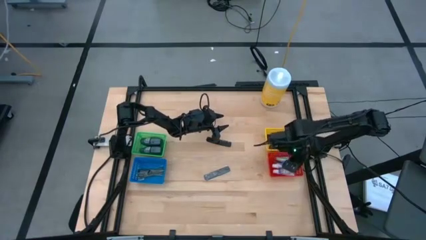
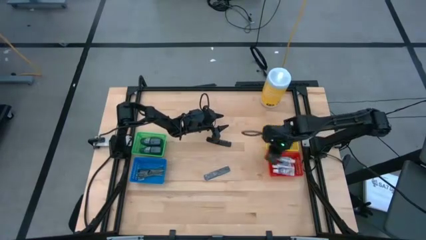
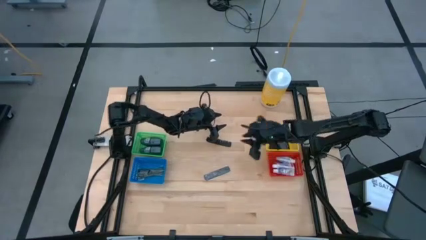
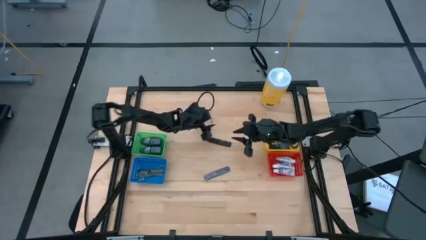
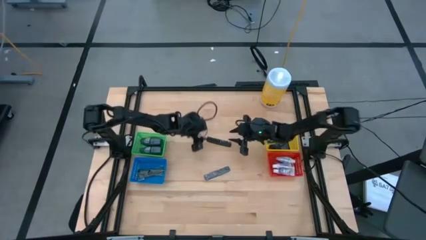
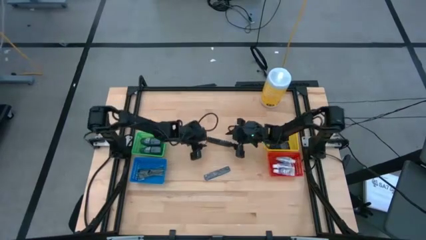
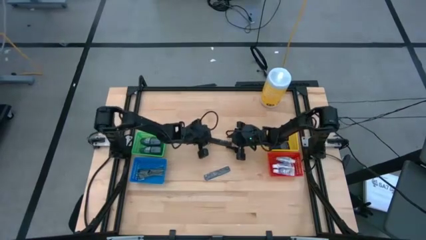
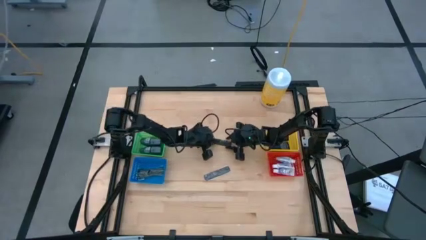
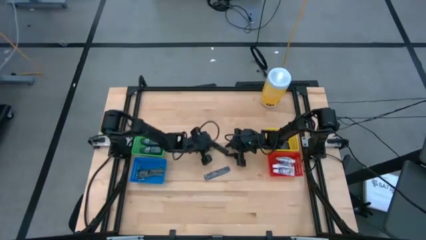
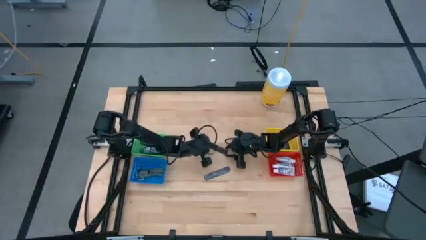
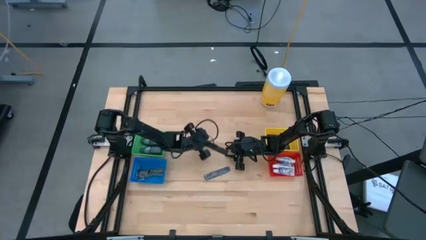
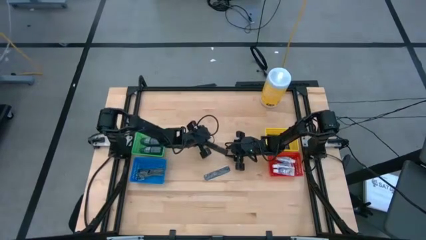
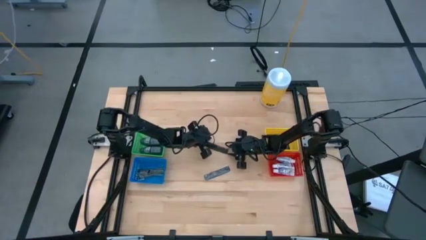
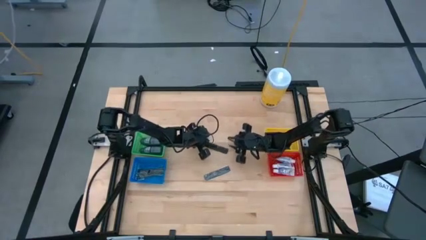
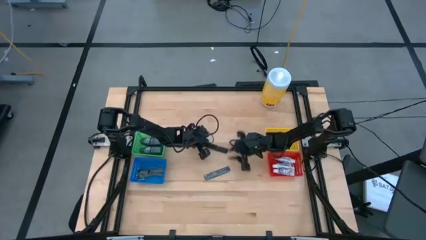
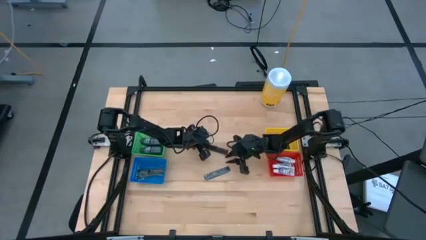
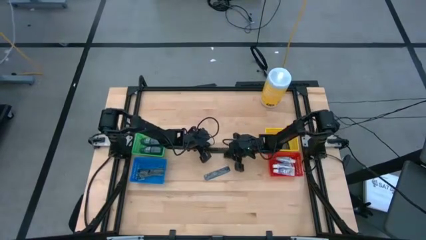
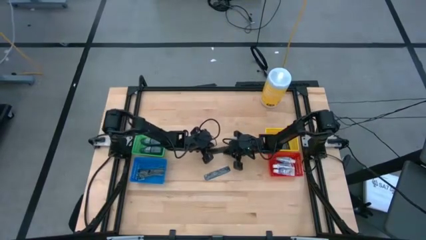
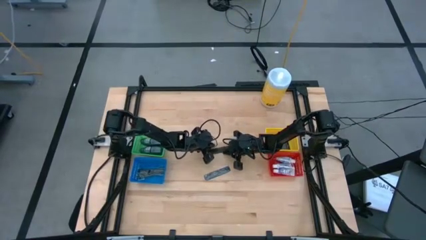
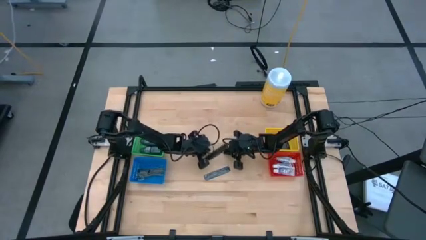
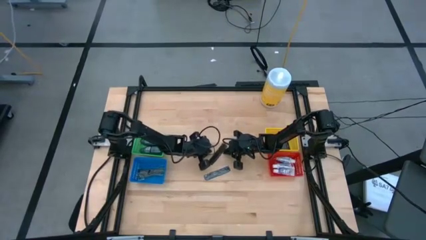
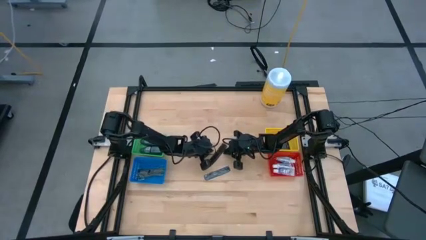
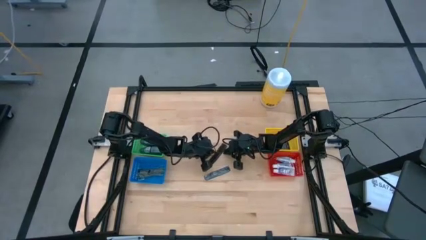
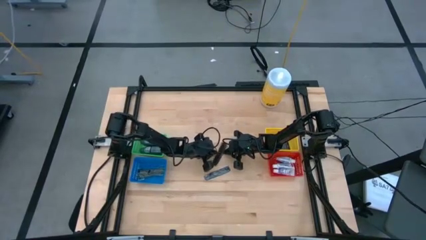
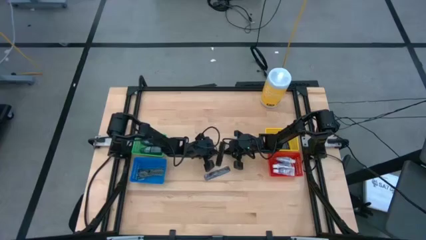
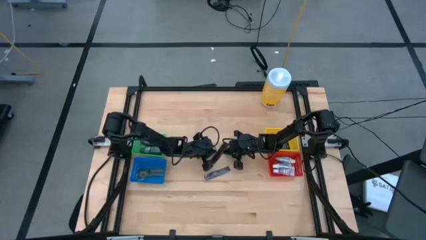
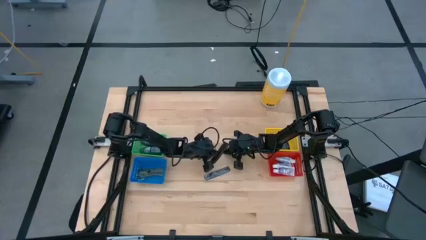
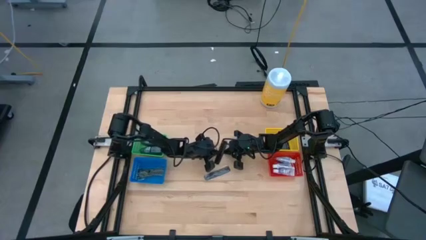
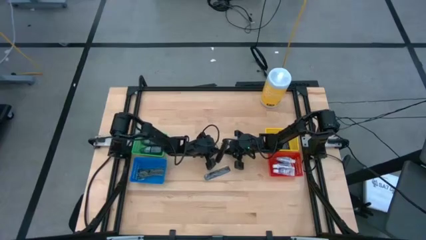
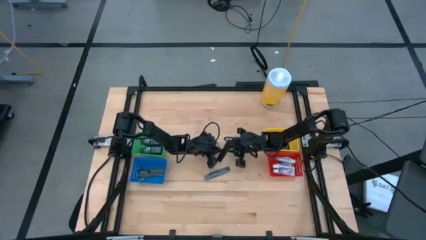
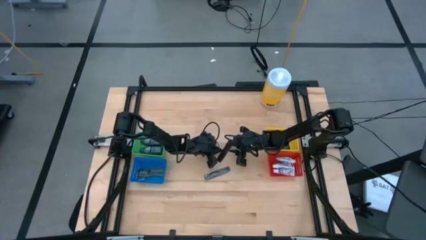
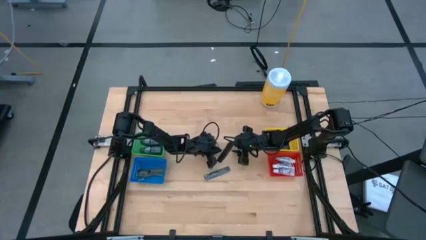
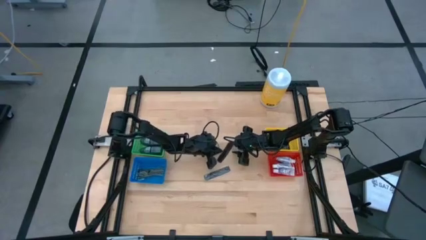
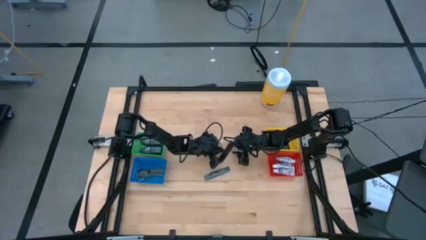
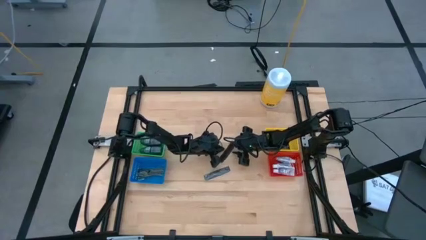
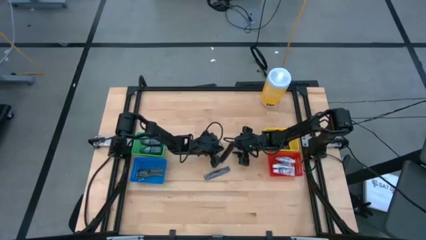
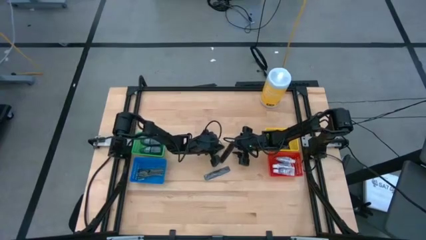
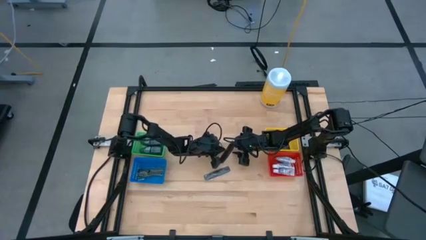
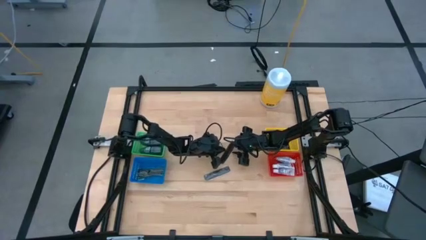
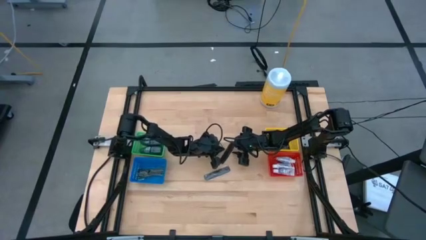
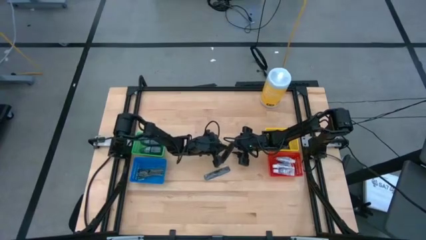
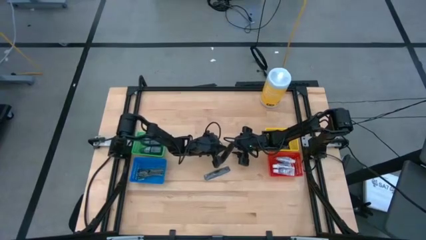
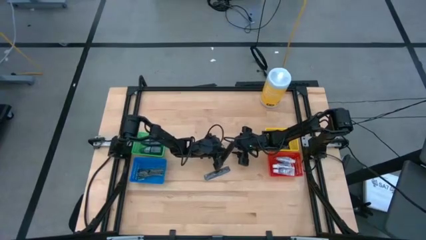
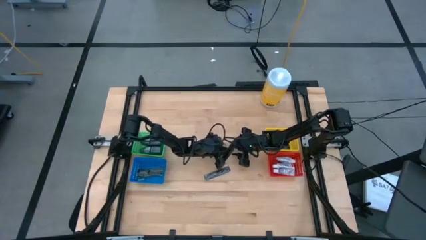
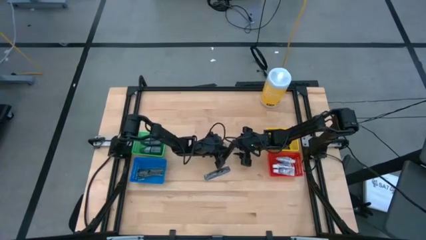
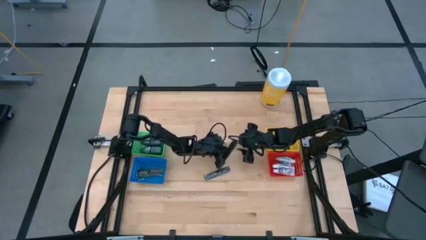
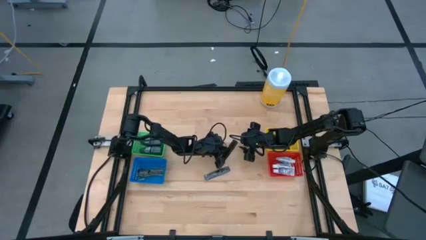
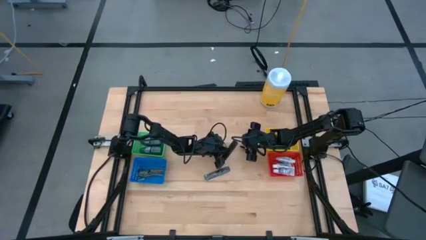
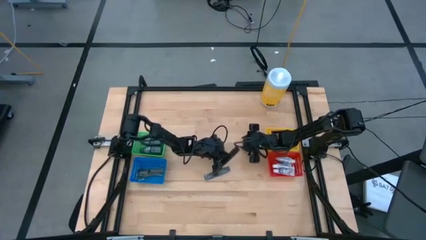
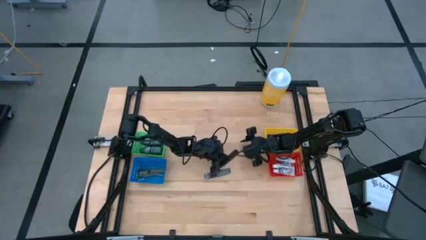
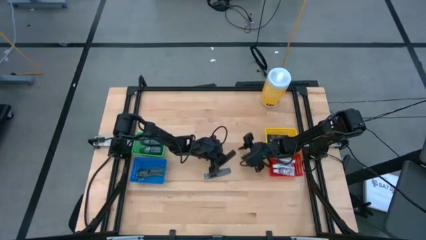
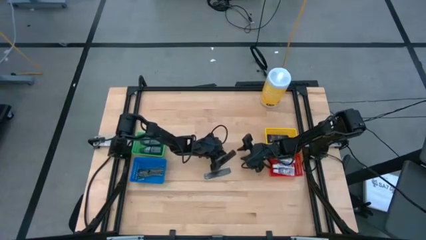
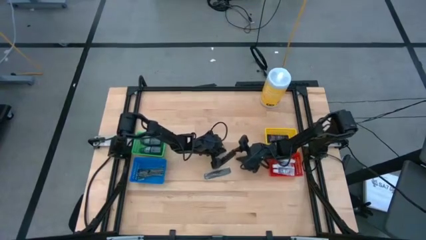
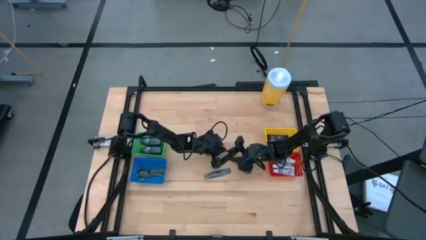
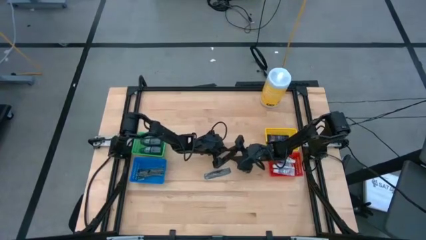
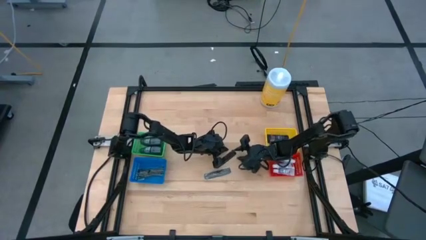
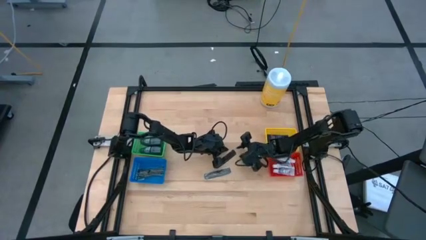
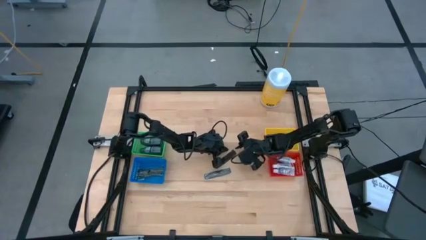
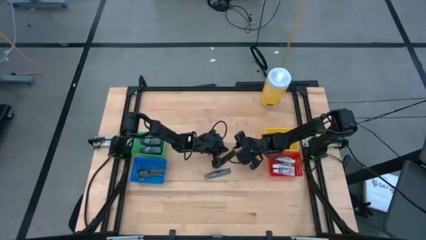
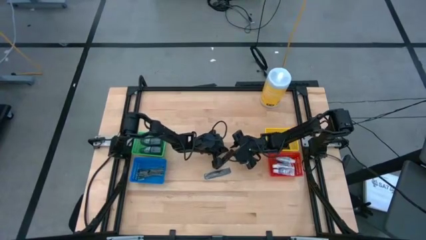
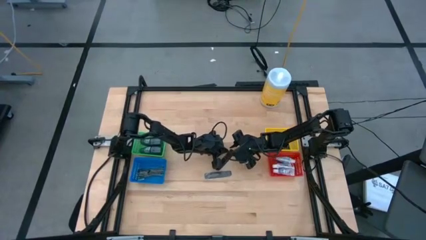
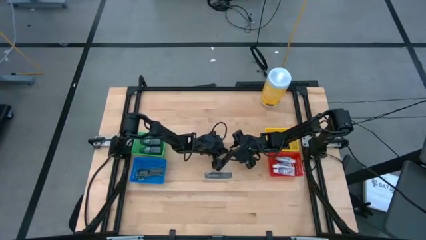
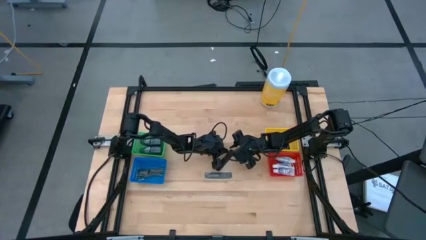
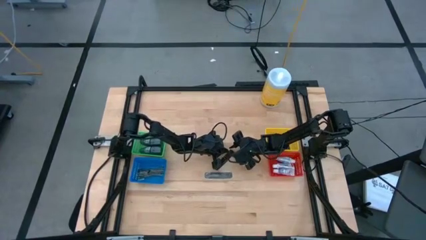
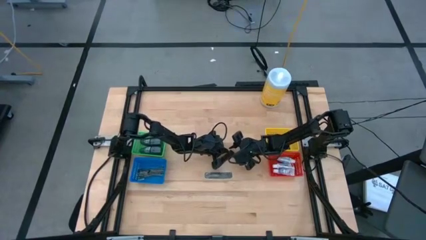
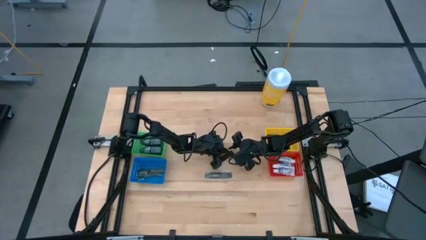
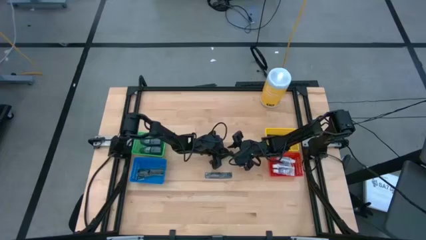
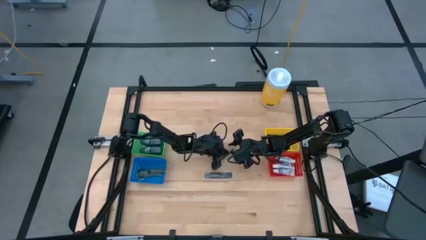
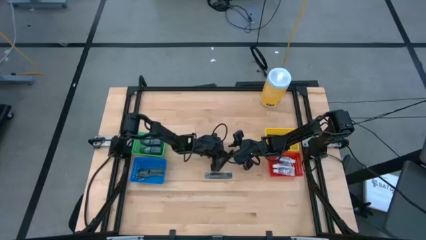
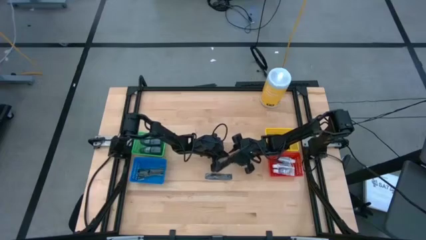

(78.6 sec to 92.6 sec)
Task: Pick & Place Travel size toiletries
Put the black comb into the blue bin
